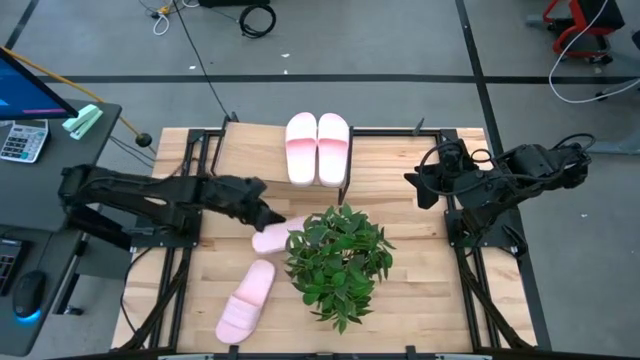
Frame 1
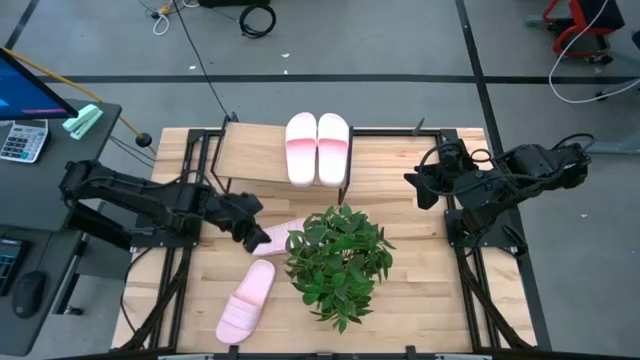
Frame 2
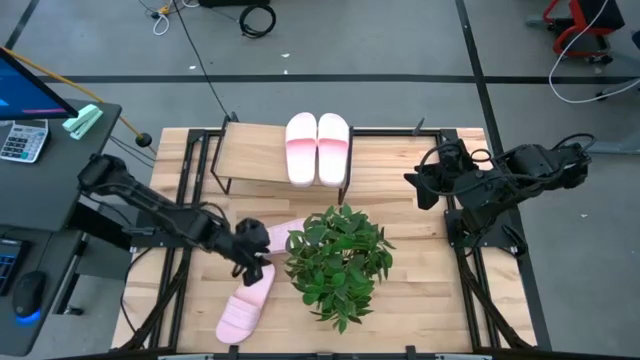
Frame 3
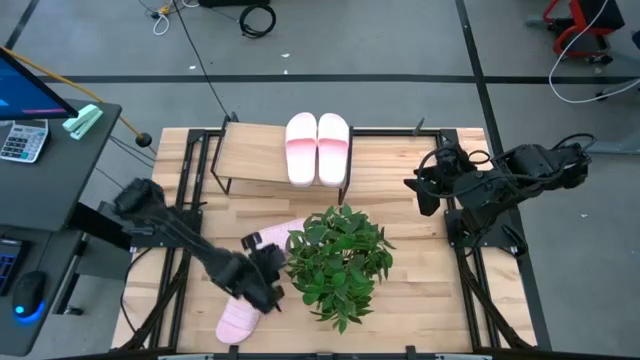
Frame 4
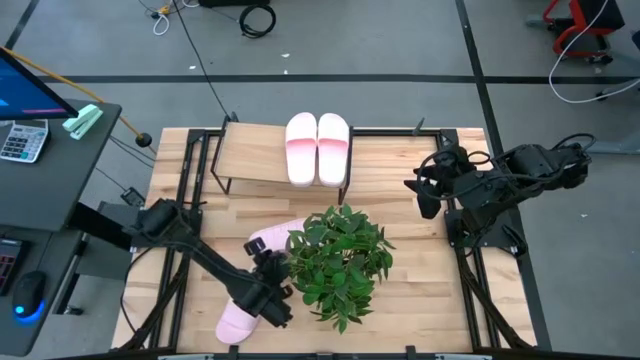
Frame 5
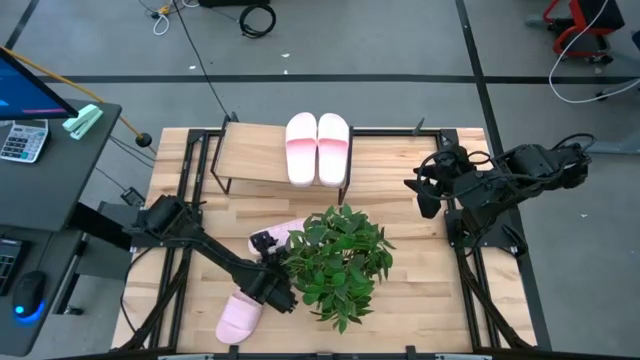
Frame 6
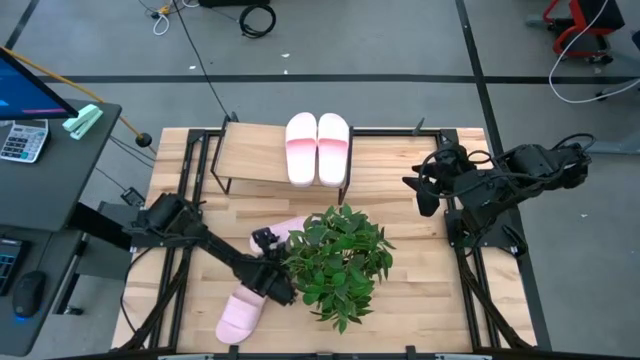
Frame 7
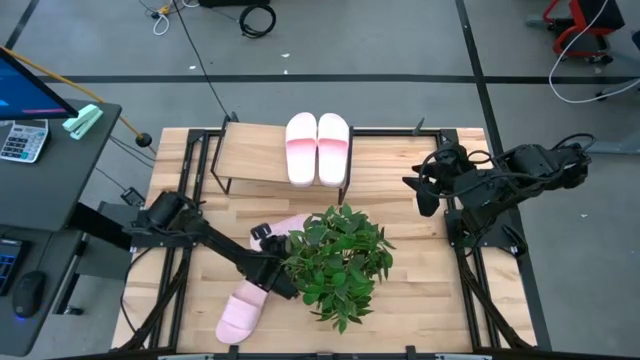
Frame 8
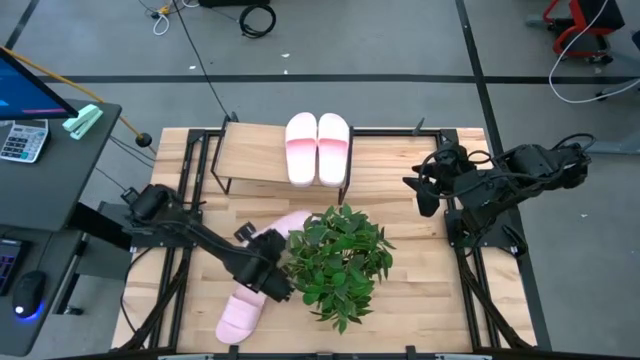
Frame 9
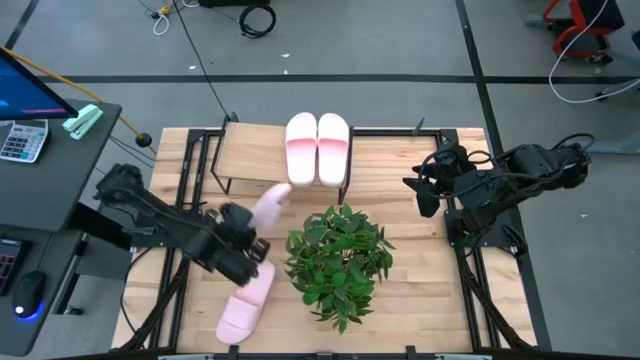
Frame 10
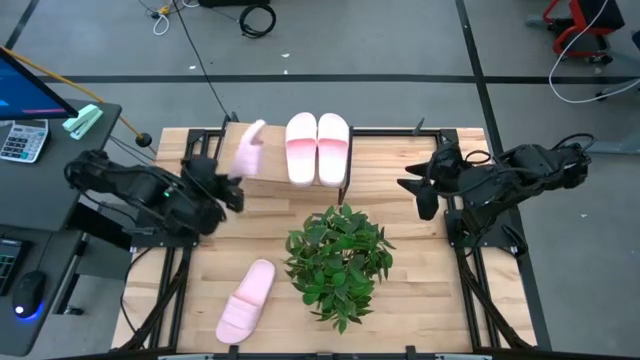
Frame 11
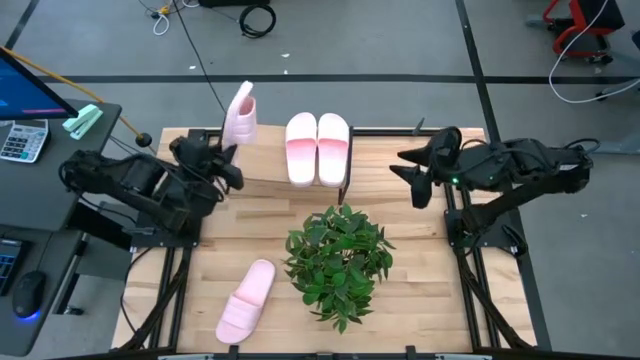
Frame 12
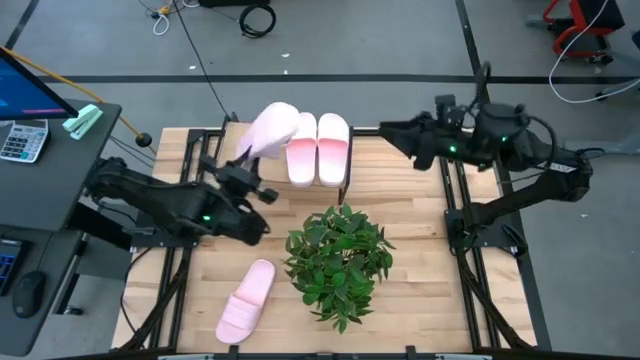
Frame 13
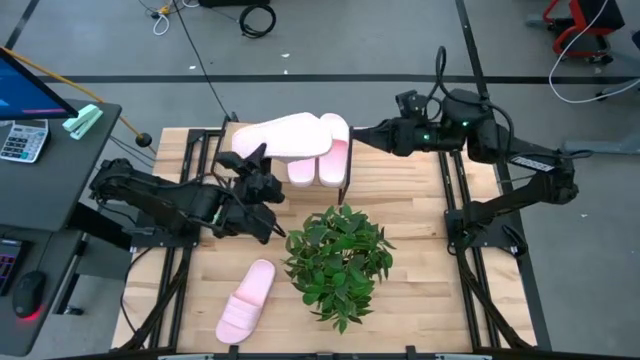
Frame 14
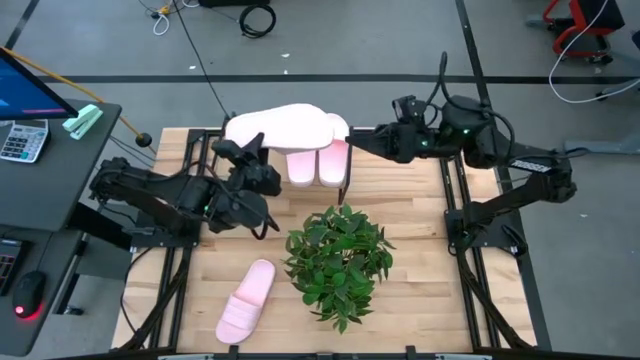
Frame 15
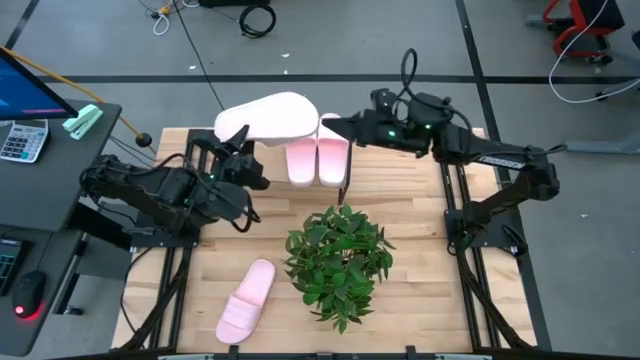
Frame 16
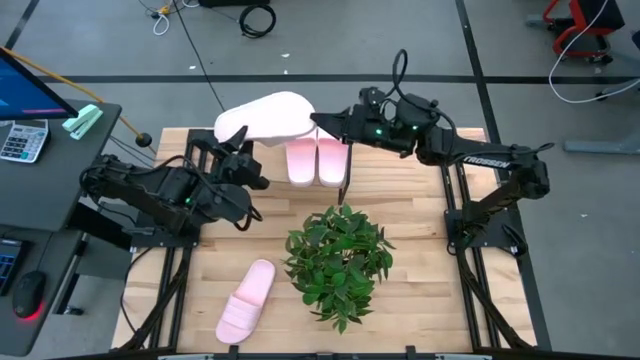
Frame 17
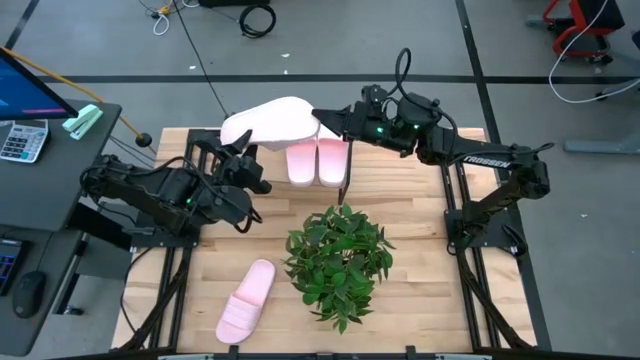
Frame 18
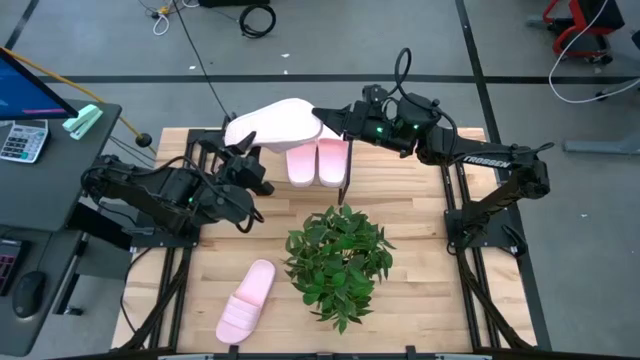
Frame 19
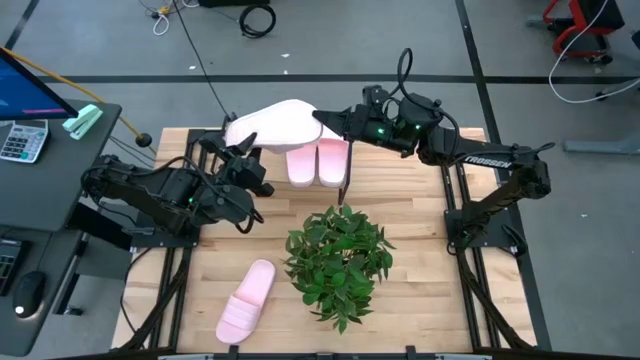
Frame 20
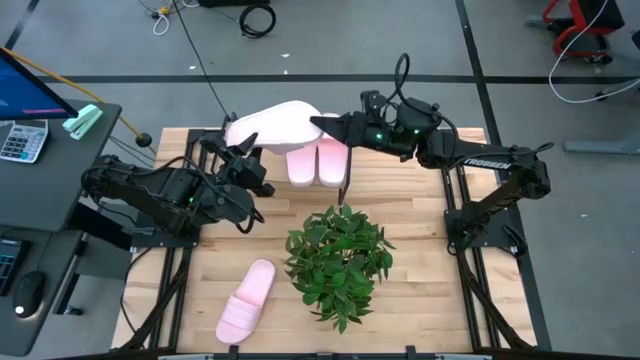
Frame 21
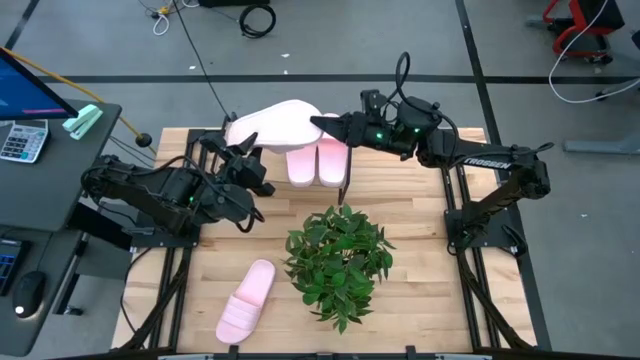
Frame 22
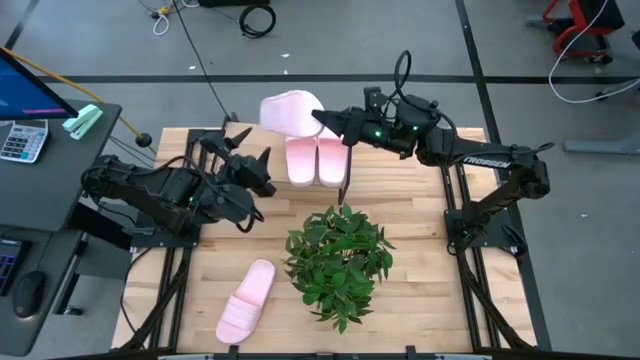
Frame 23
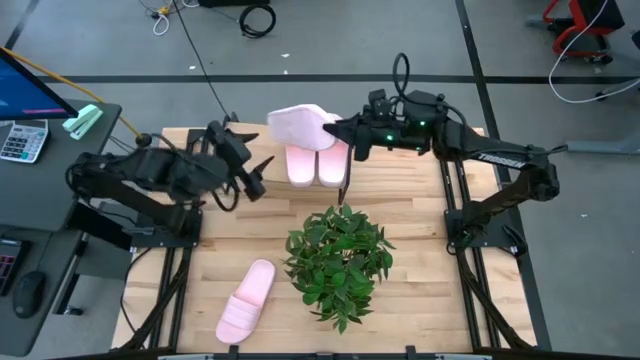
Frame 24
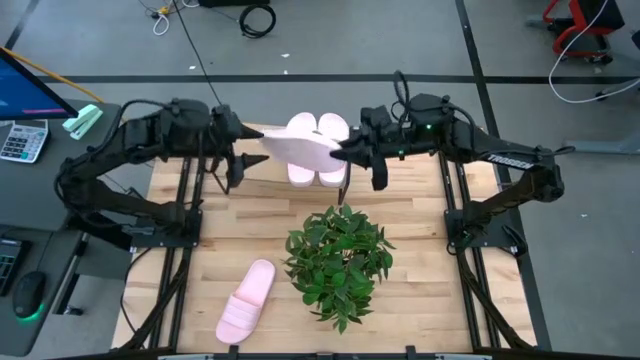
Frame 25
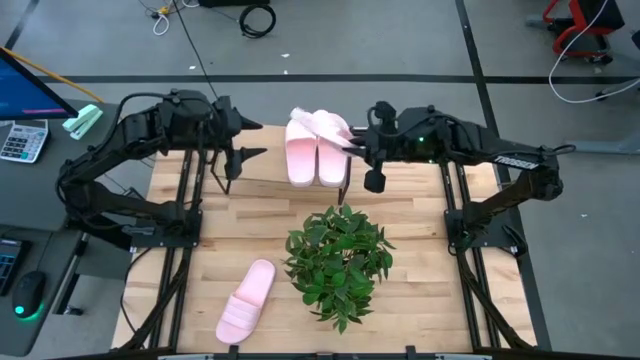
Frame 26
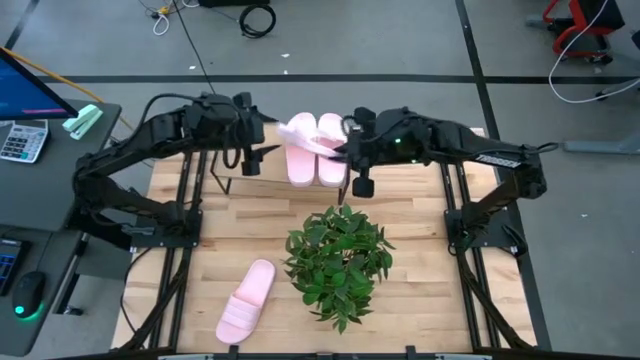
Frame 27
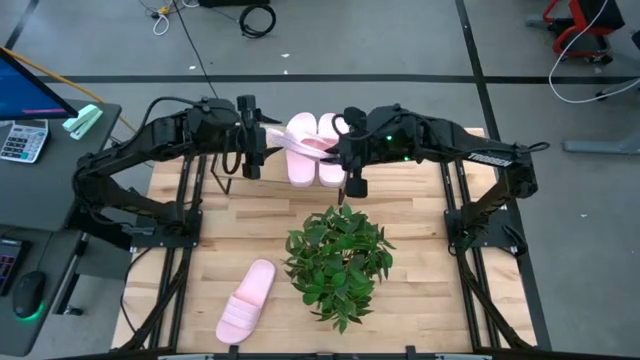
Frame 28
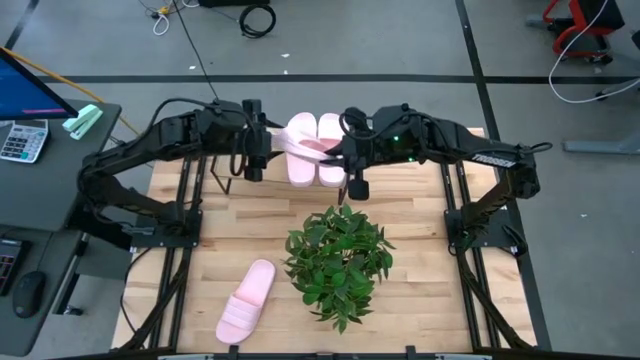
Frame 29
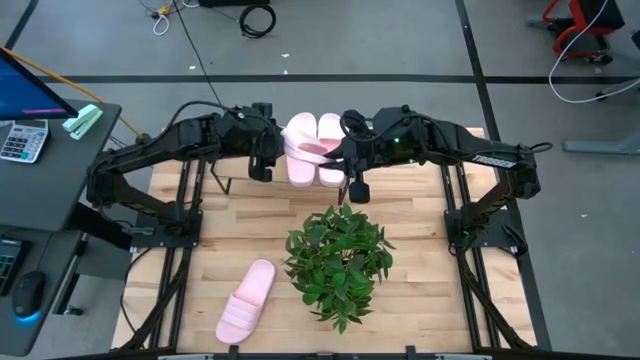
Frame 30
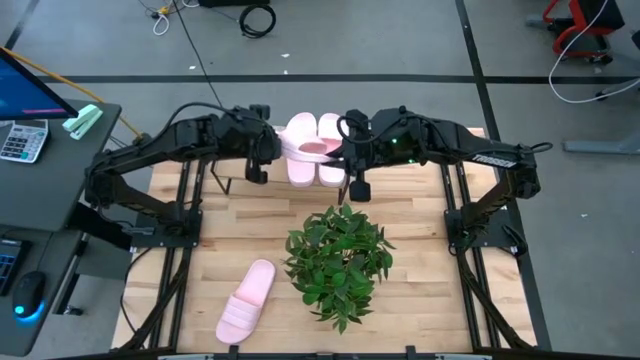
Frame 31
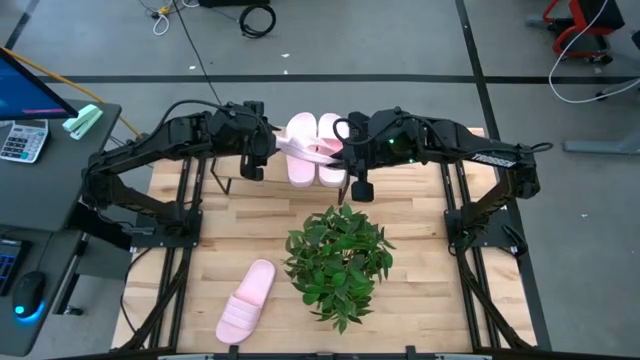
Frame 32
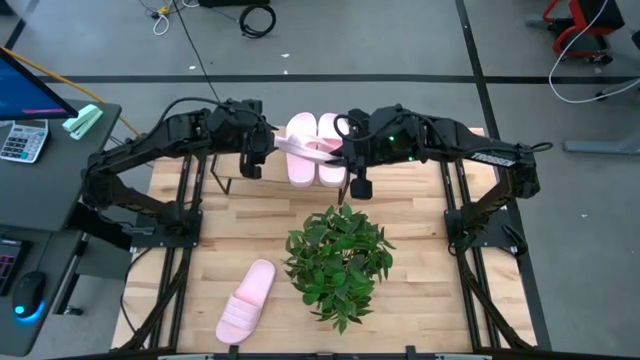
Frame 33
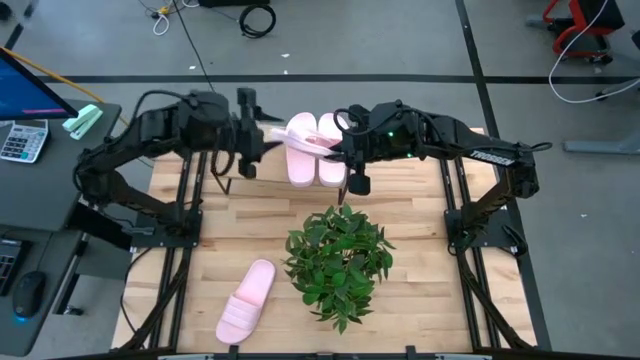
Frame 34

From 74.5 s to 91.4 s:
Task: Pick and place slides into the shelf
Put the pink slide on the shelf
